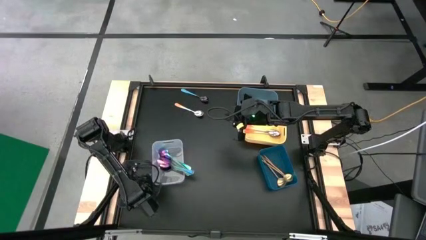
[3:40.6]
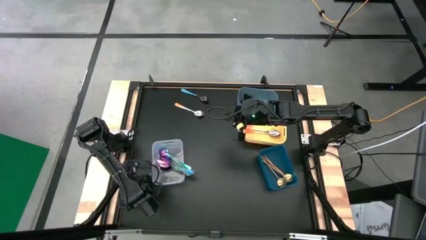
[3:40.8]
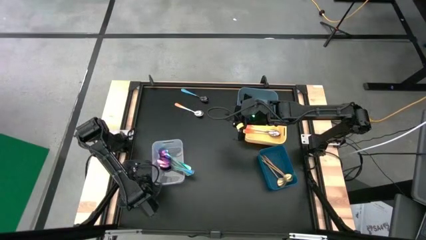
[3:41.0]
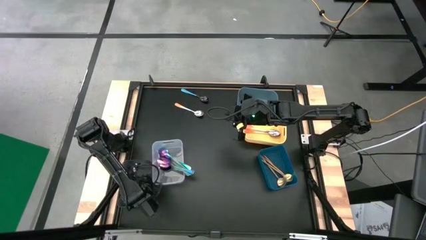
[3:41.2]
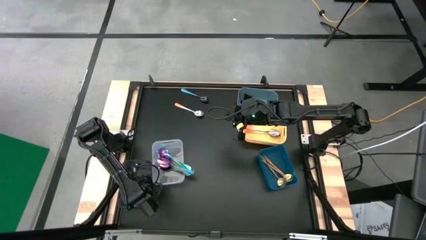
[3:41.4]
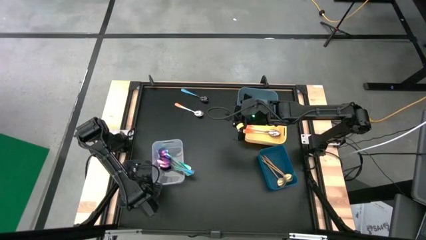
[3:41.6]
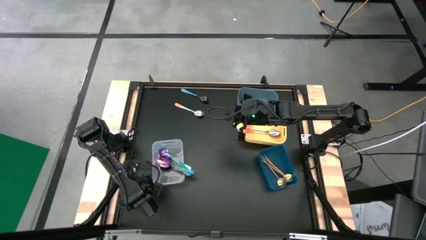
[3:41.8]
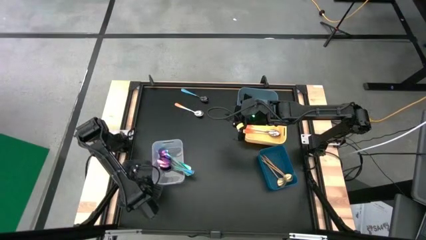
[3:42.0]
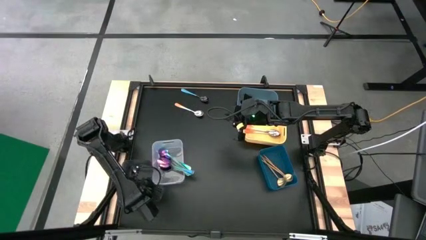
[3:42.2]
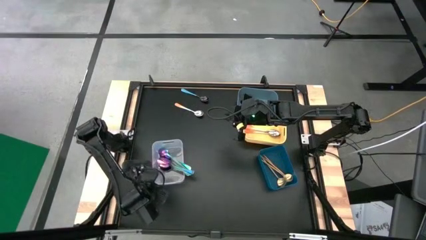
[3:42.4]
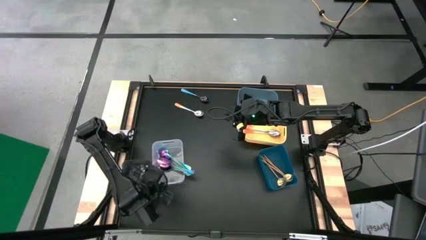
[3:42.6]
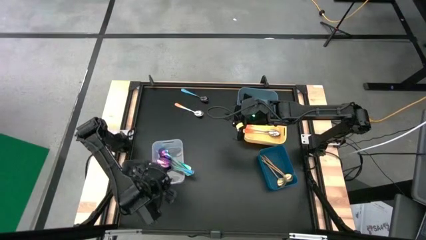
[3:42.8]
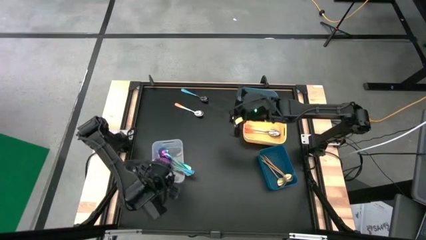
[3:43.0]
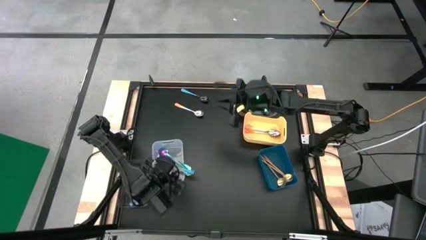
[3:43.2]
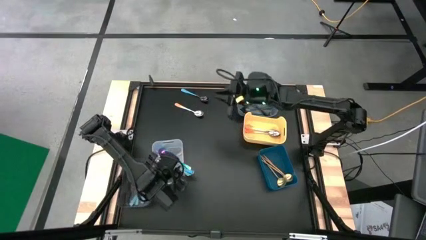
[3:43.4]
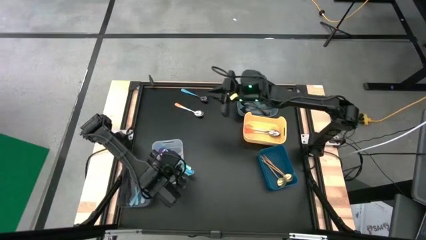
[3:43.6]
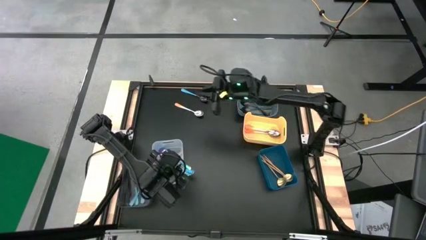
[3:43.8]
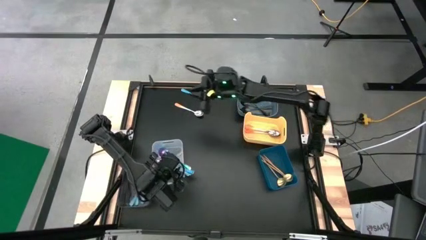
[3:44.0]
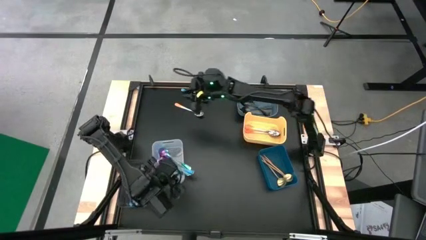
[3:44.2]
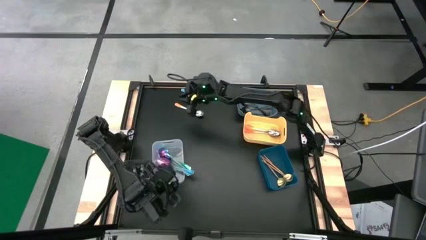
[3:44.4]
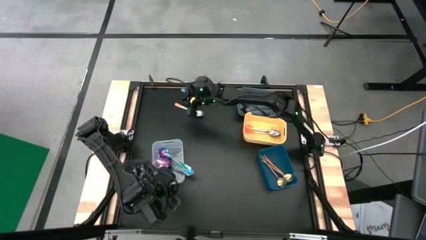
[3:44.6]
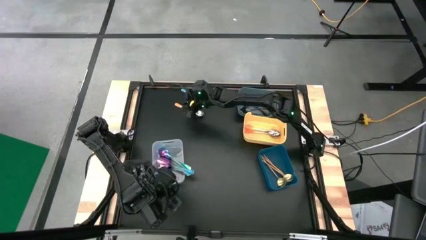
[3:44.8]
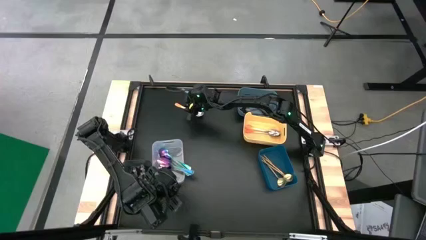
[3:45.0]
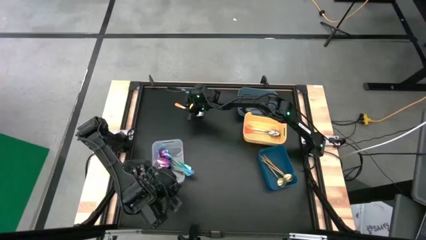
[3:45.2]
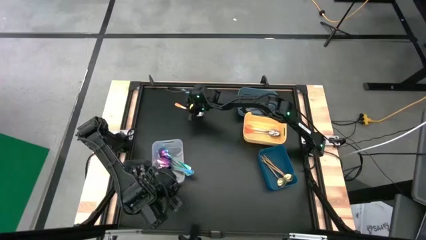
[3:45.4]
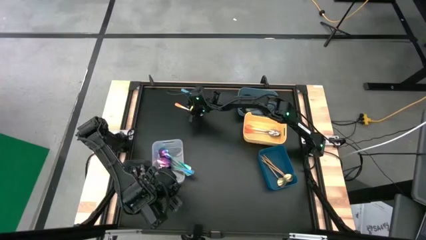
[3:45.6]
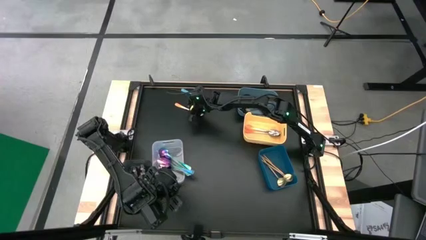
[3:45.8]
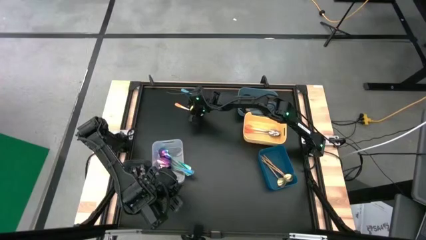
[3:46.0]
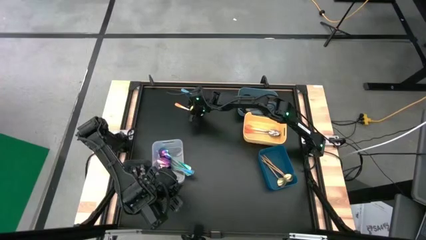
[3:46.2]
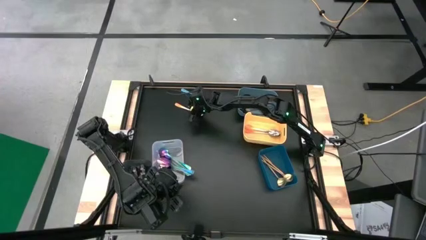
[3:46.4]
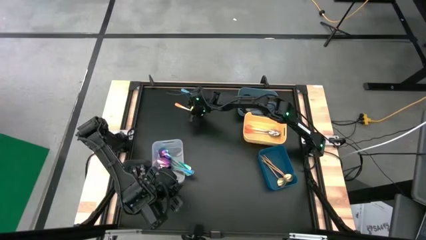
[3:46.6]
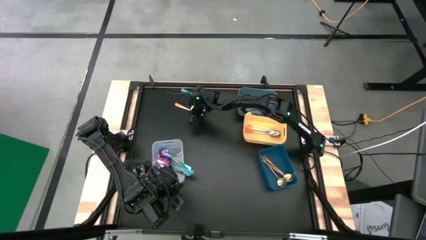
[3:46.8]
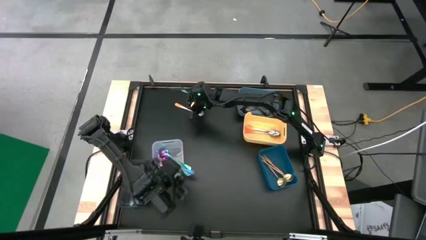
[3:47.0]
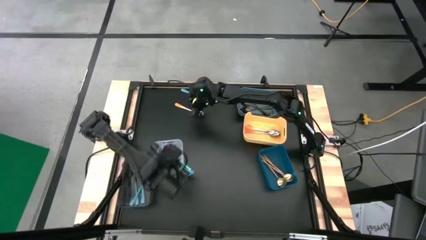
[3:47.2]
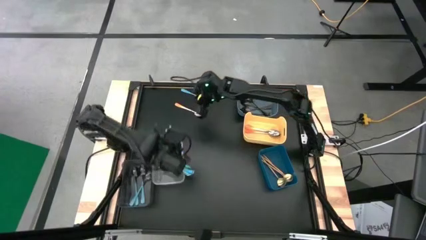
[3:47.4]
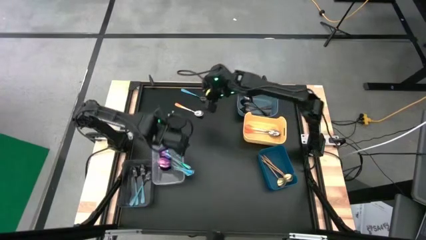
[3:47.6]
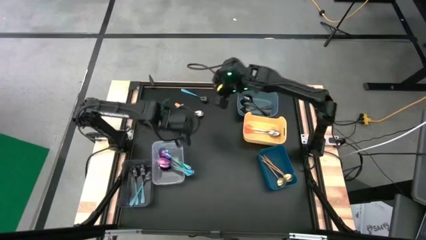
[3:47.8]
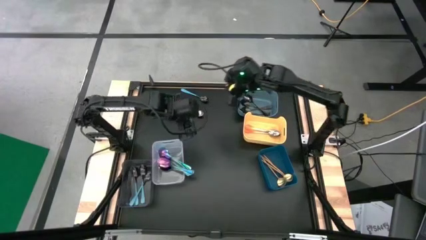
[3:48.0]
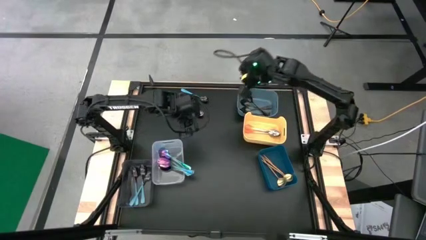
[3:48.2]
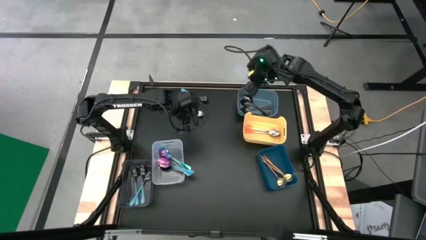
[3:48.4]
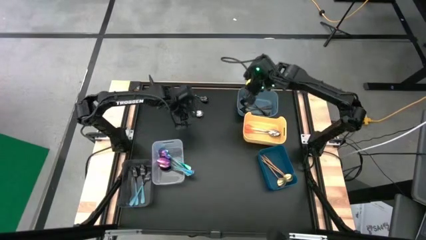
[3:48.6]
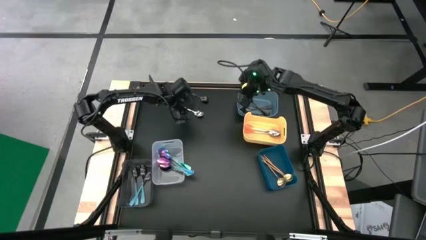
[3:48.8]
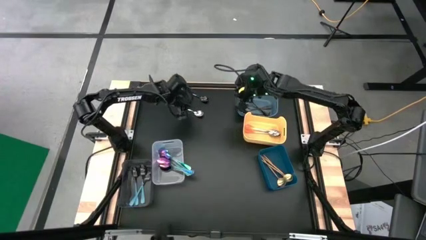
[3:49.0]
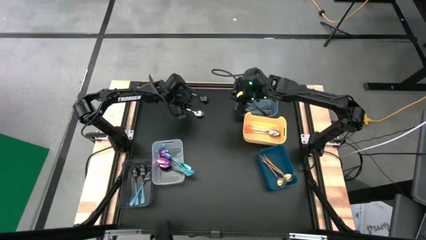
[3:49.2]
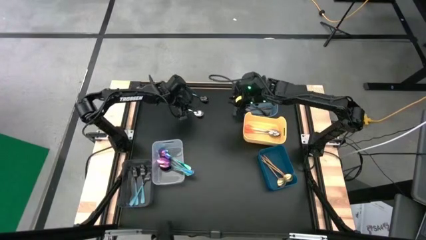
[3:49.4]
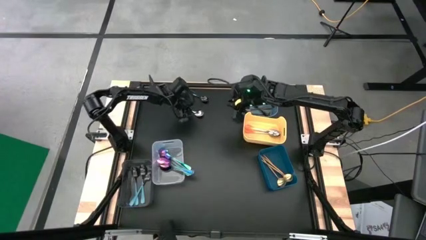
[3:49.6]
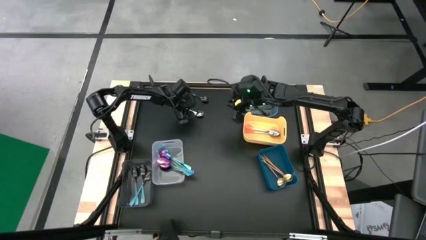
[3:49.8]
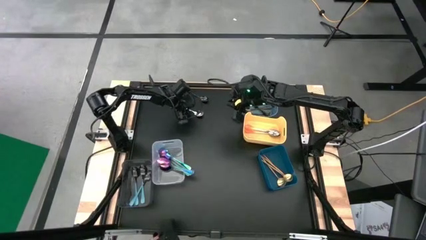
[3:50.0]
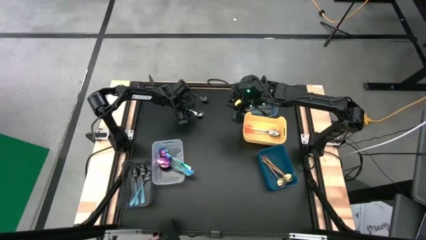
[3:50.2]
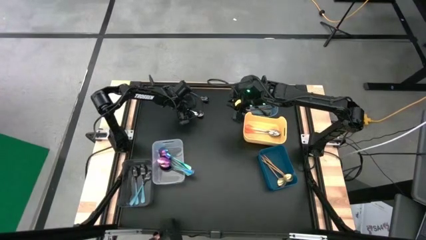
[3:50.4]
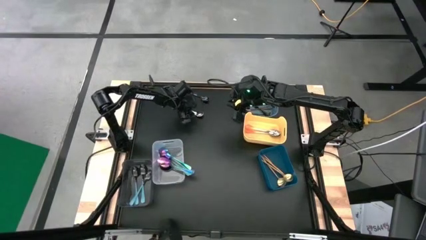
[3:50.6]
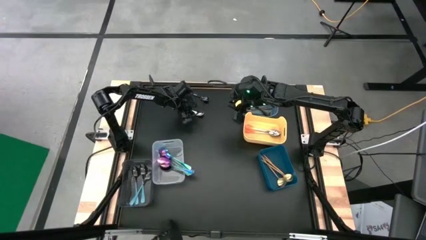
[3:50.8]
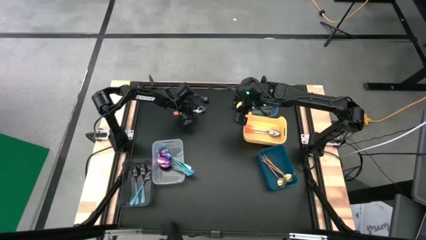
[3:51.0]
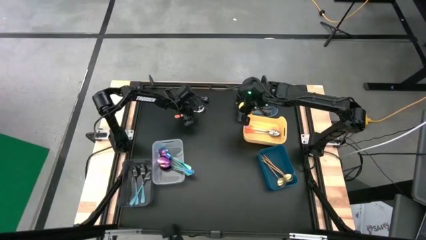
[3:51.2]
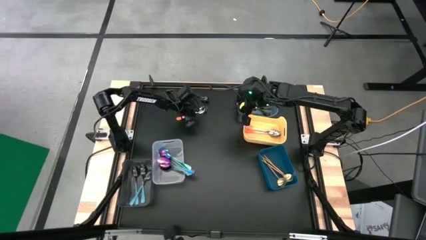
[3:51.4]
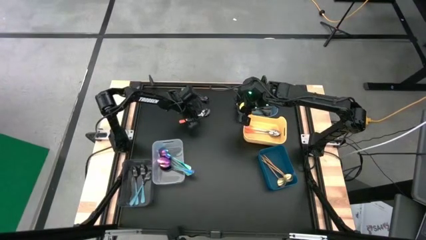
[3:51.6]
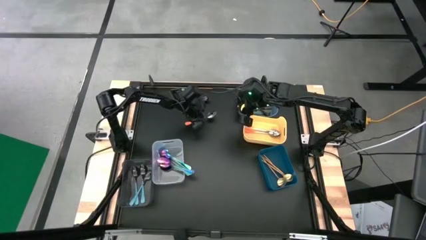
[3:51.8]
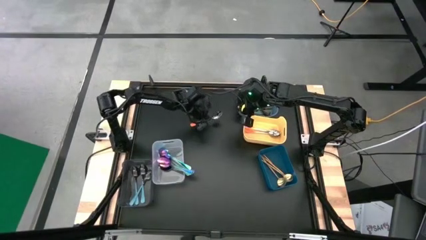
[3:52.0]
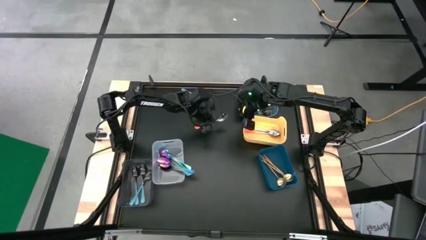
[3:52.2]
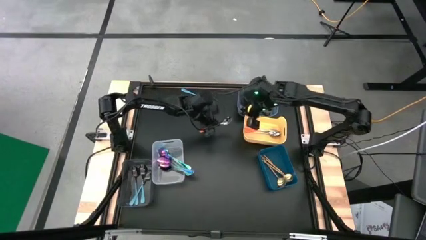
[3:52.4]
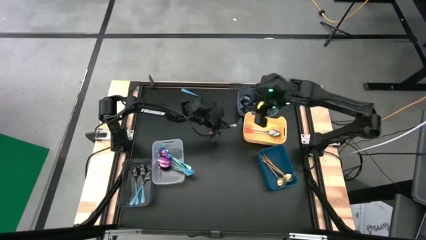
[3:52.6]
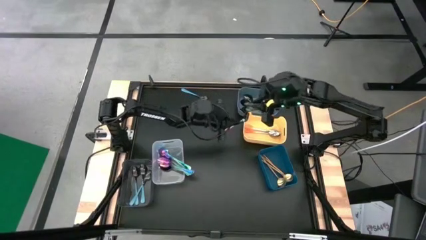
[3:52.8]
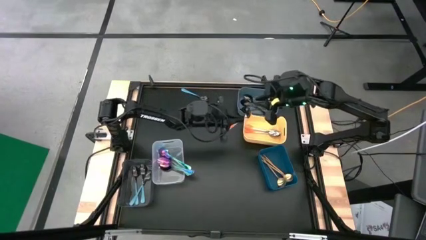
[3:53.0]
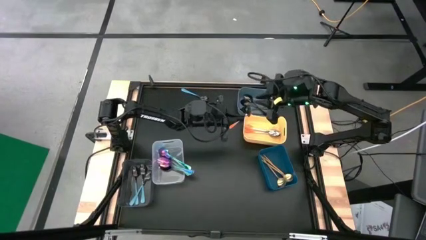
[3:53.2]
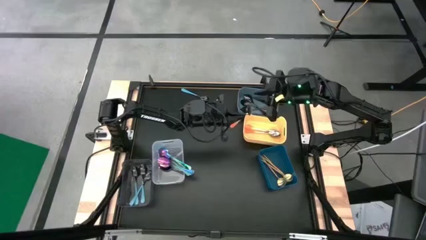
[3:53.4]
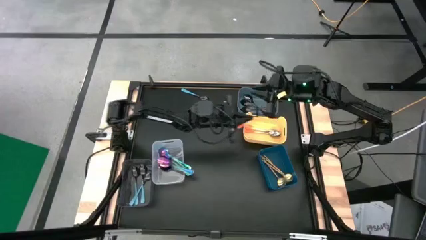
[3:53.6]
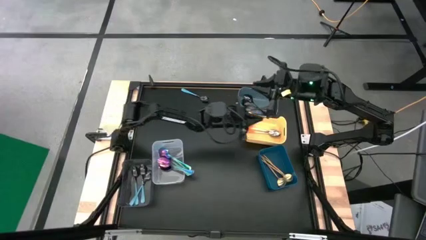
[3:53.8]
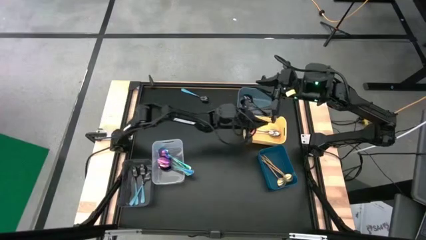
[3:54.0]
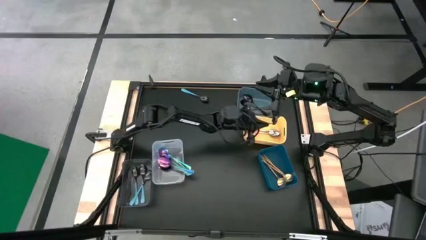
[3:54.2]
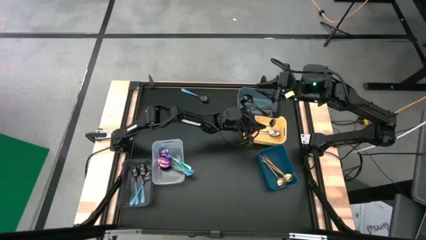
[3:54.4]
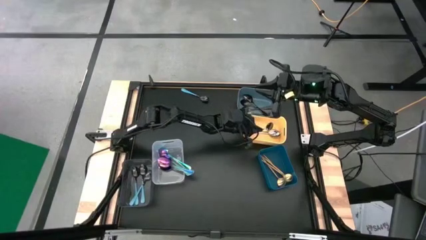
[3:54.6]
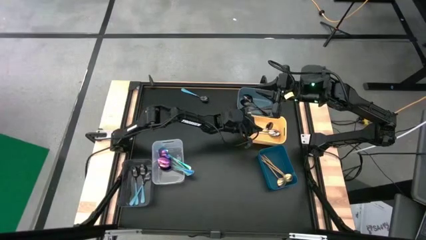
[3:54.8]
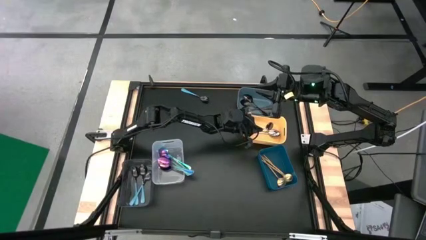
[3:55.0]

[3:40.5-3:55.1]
Task: Sort silverware by color (type)
Put the orange spoon into the yellow bin
